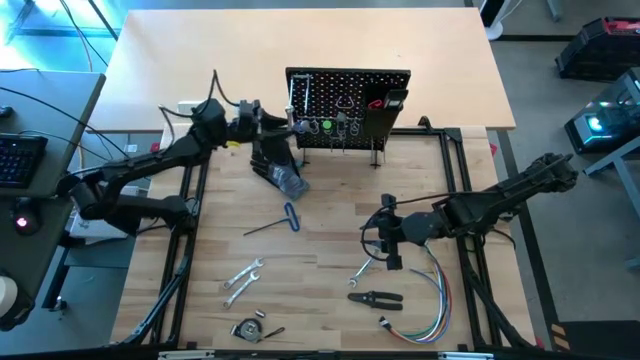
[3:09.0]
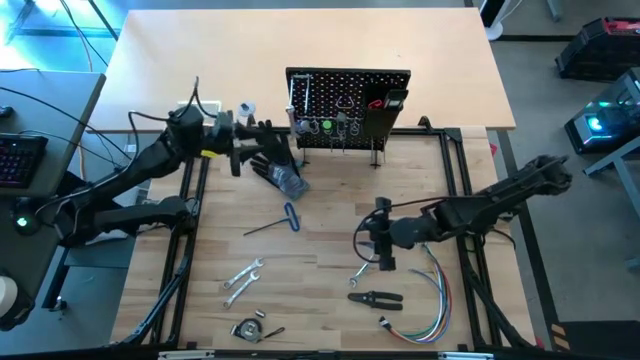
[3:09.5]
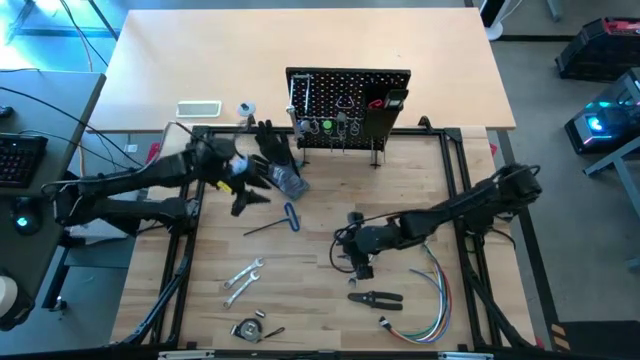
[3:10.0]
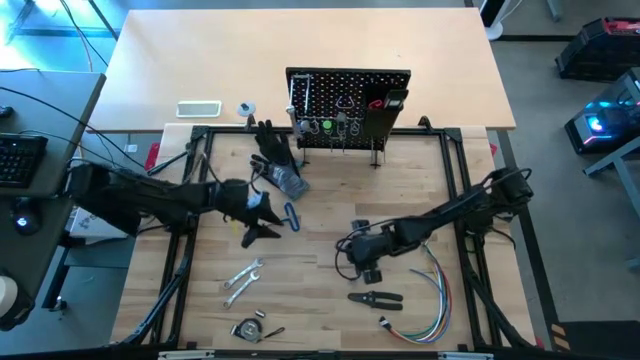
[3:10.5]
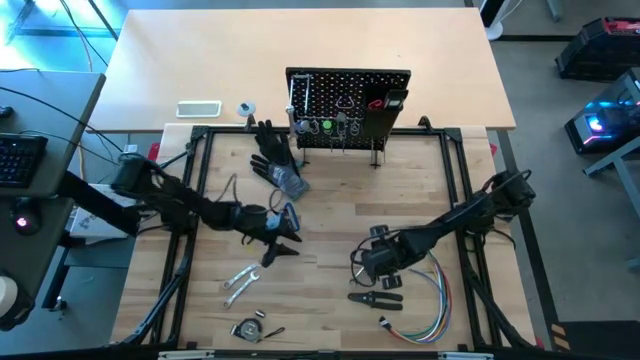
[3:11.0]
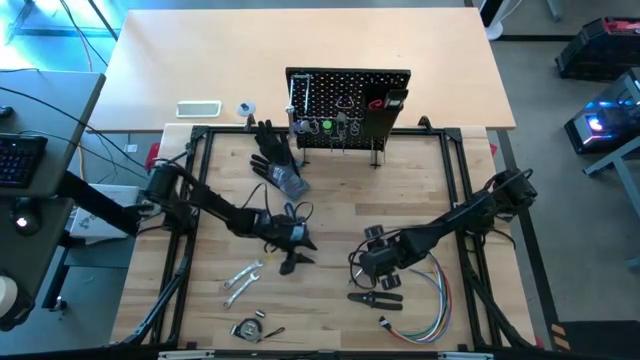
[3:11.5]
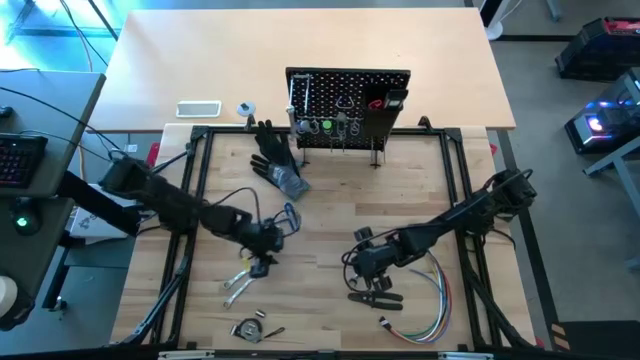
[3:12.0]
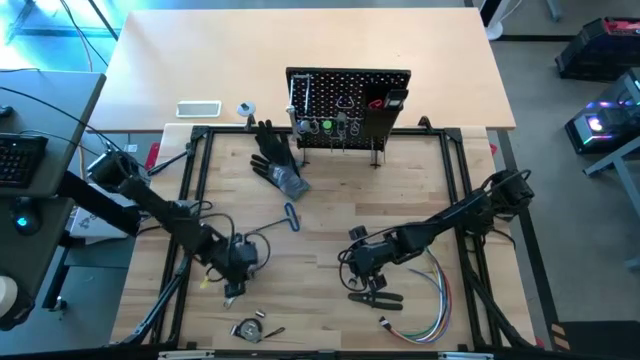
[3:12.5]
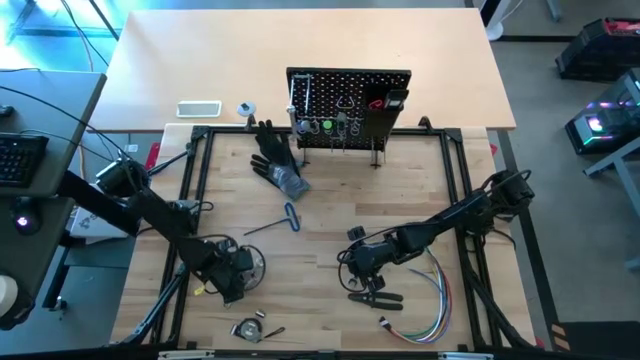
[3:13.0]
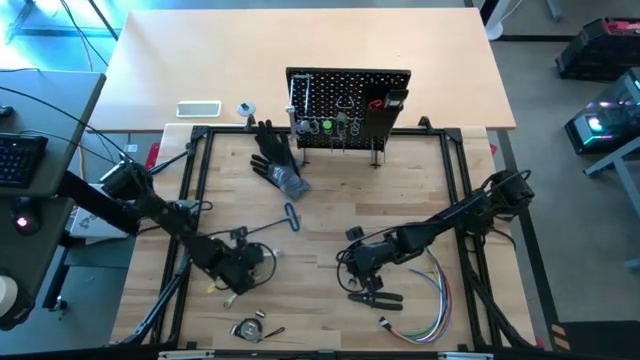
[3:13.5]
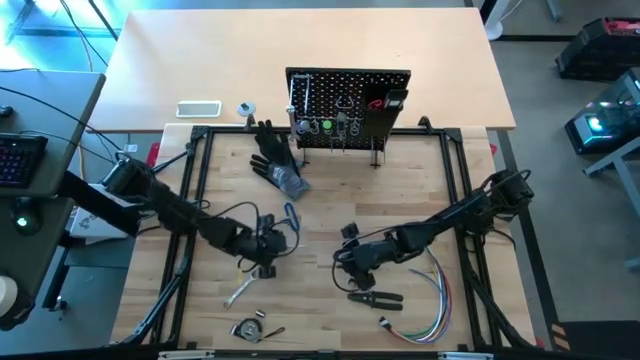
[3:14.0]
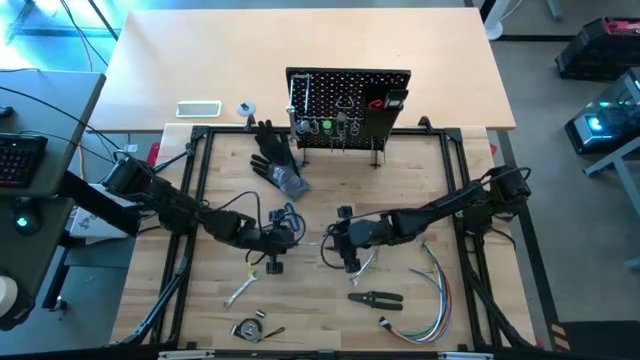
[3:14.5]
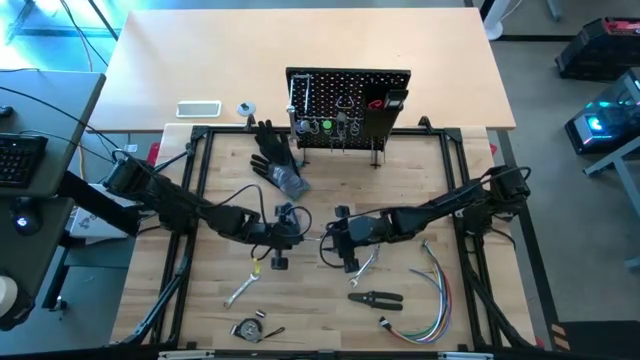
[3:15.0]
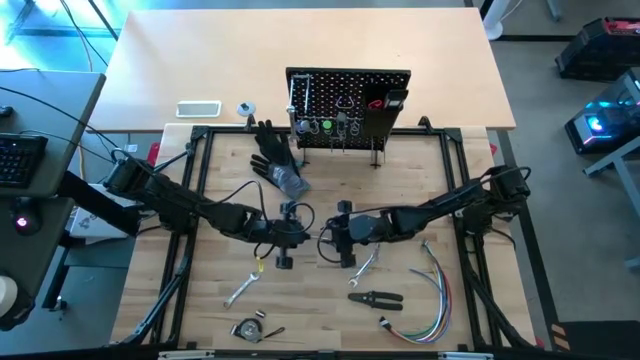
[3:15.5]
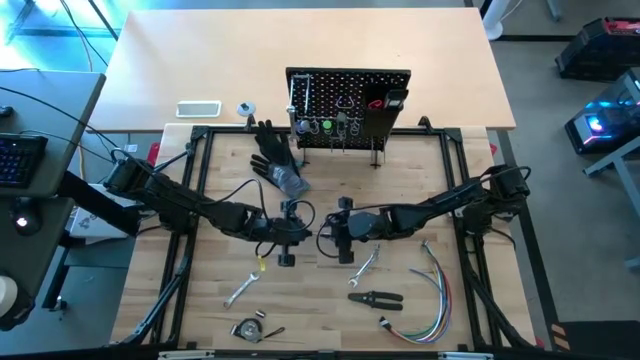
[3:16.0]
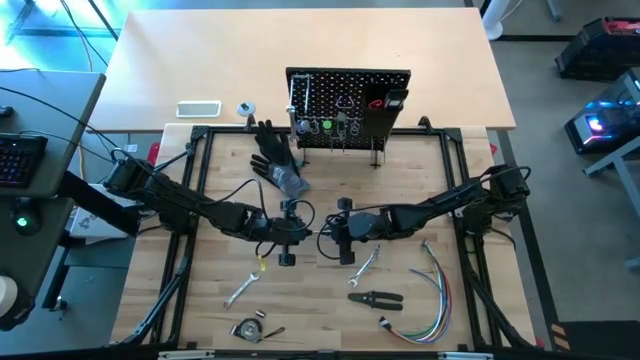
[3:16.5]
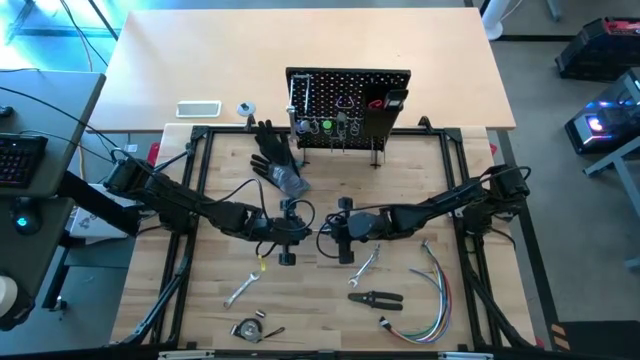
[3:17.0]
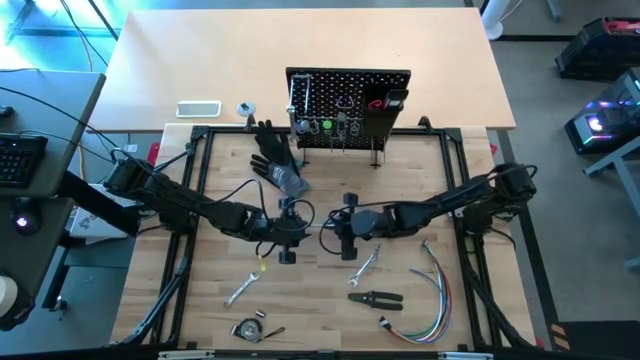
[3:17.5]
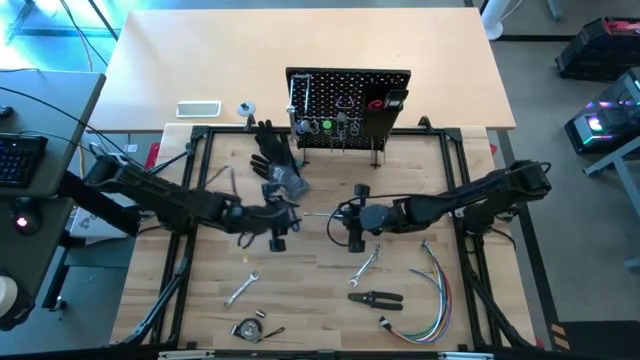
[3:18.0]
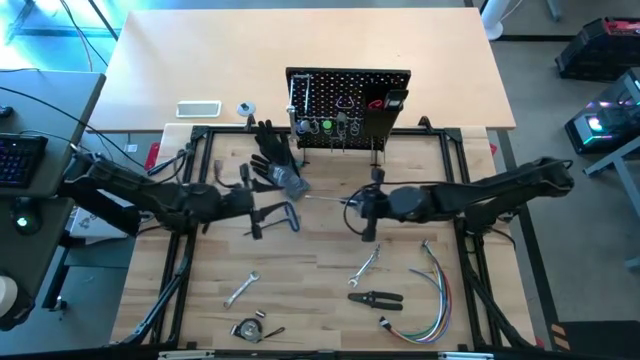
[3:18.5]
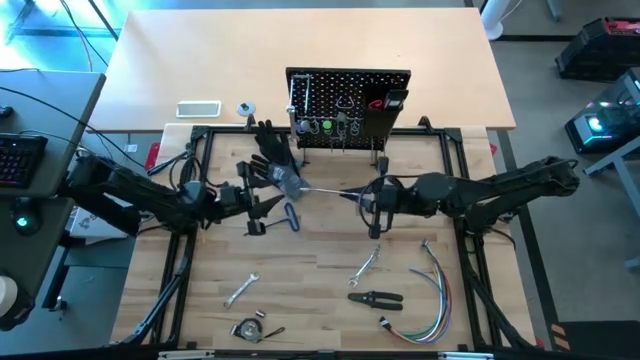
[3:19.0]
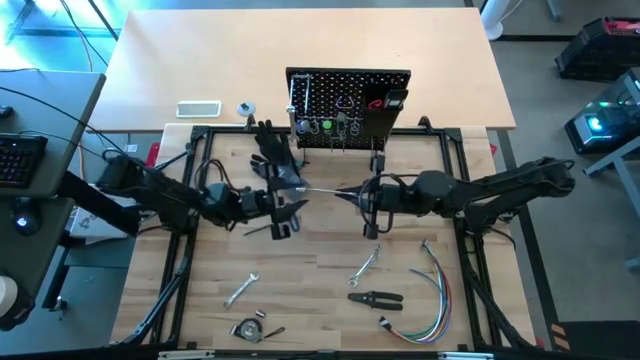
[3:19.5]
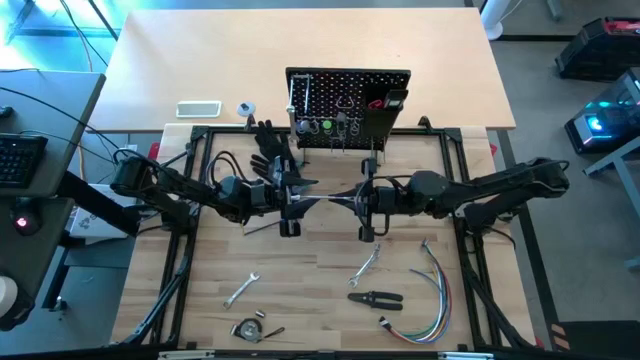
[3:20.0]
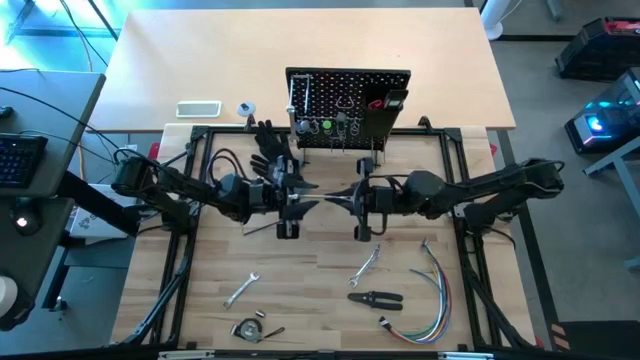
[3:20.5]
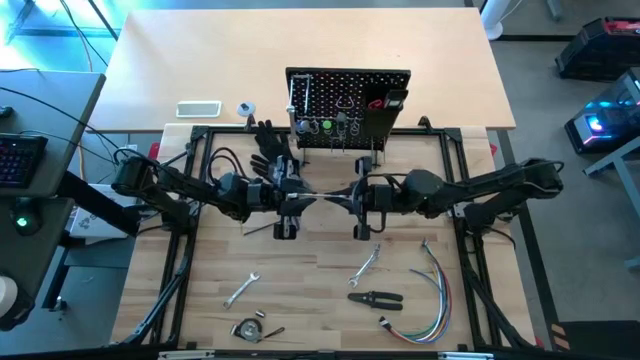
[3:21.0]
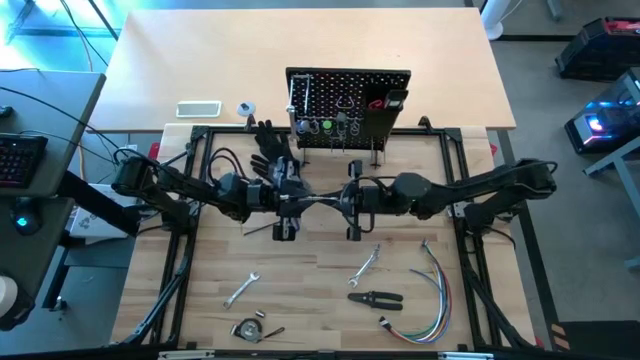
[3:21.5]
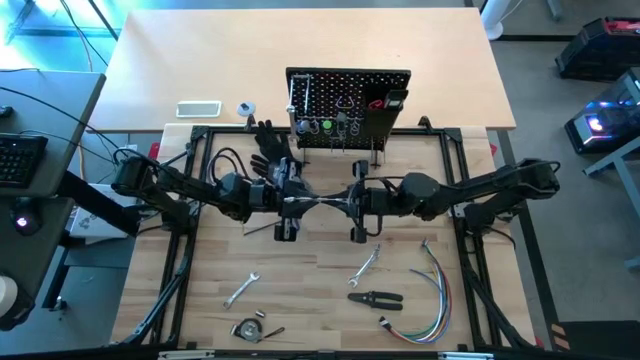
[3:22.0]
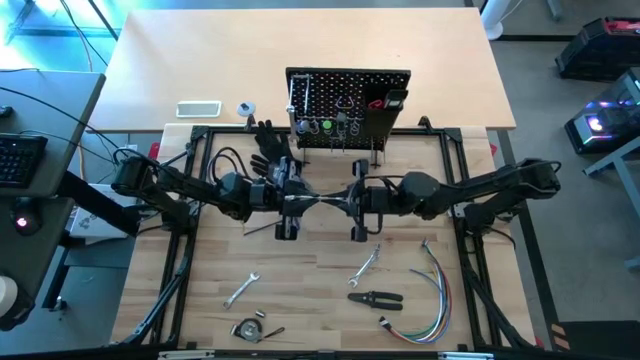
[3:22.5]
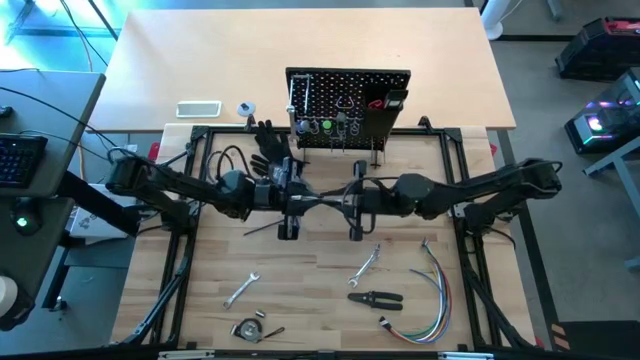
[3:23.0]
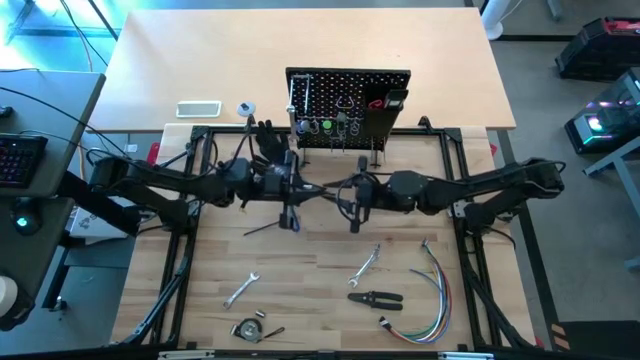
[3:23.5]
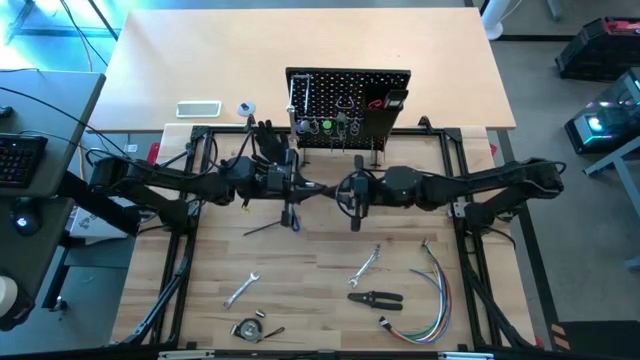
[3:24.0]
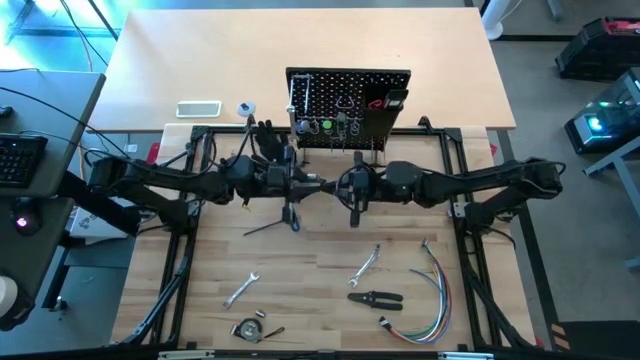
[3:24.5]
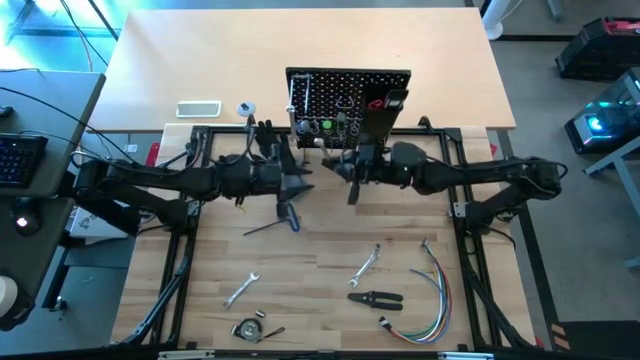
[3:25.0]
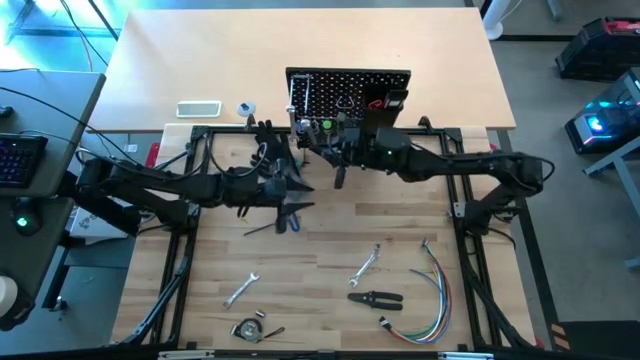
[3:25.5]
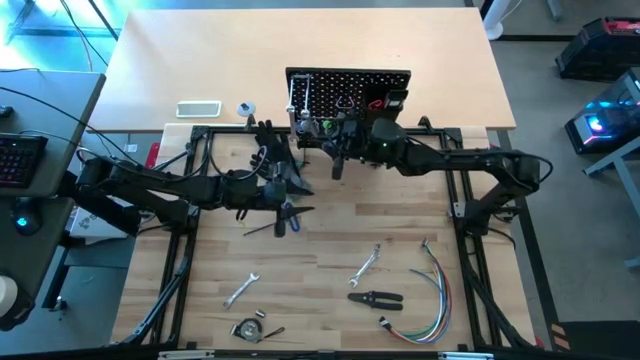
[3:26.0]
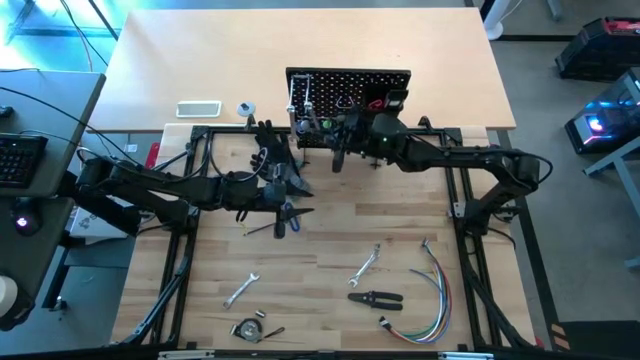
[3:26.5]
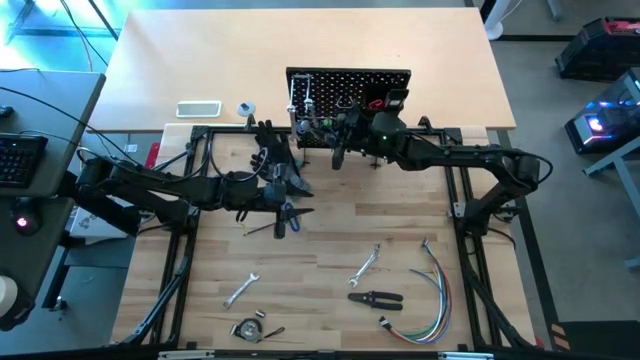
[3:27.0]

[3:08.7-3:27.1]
Task: Hang tools onto peg board
Hang the silver wrench on the pegboard
